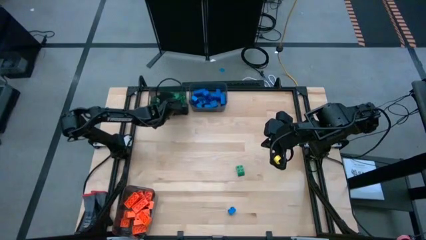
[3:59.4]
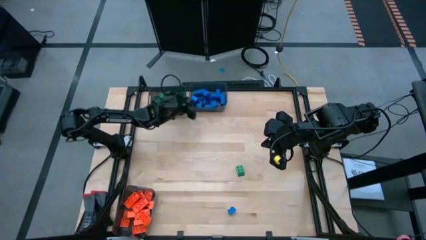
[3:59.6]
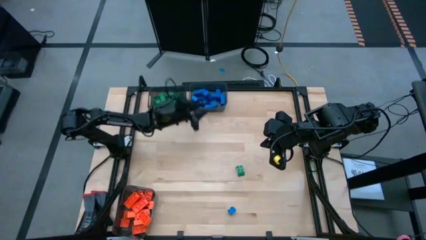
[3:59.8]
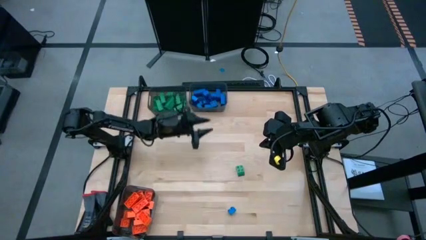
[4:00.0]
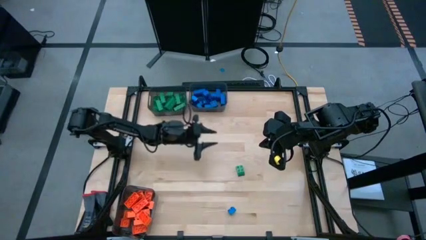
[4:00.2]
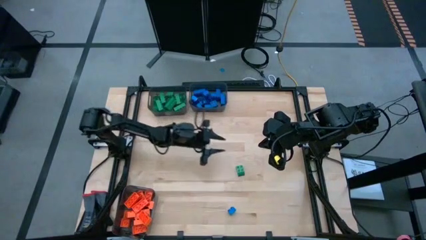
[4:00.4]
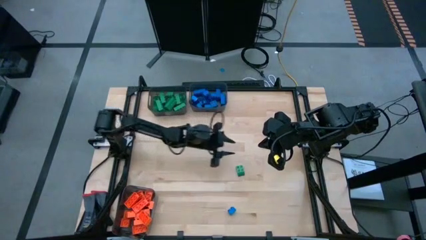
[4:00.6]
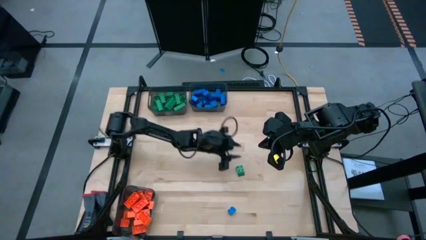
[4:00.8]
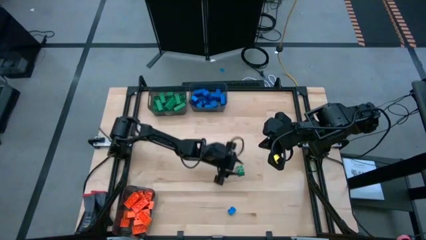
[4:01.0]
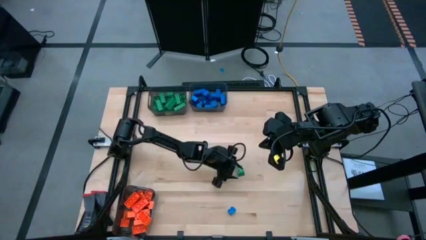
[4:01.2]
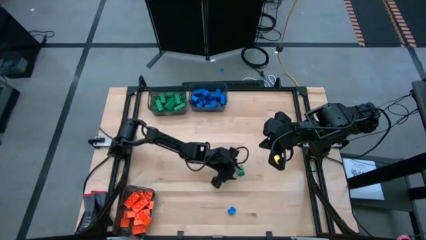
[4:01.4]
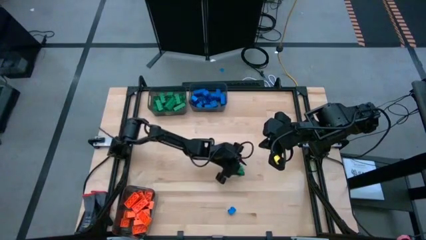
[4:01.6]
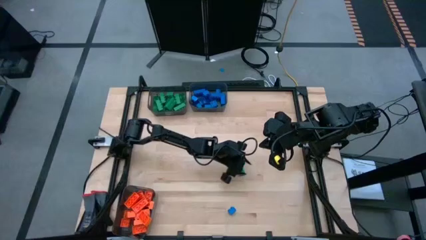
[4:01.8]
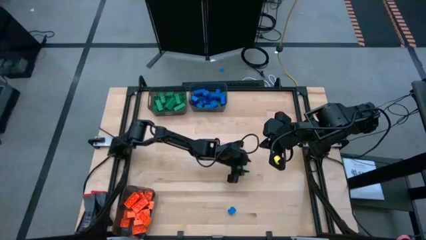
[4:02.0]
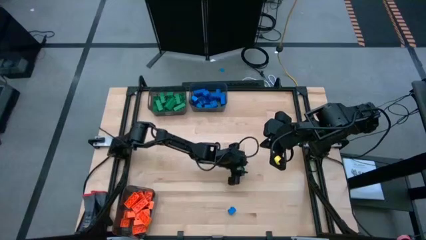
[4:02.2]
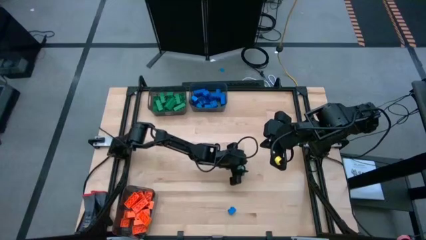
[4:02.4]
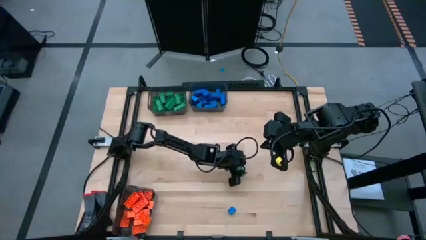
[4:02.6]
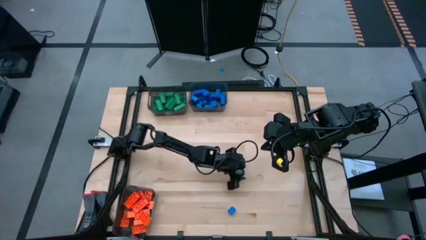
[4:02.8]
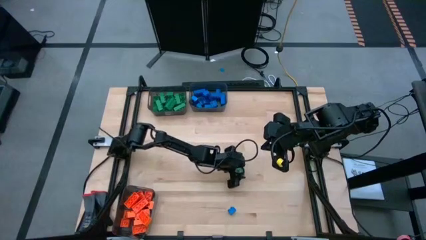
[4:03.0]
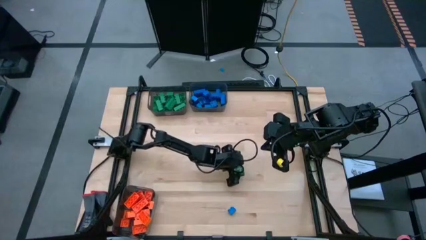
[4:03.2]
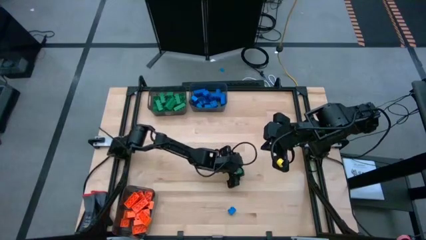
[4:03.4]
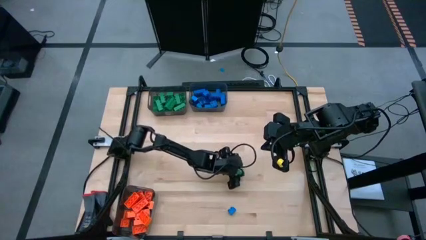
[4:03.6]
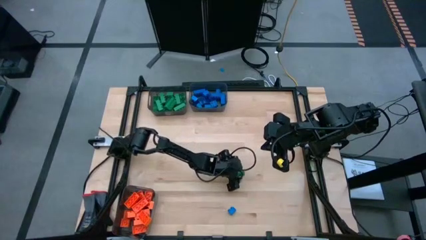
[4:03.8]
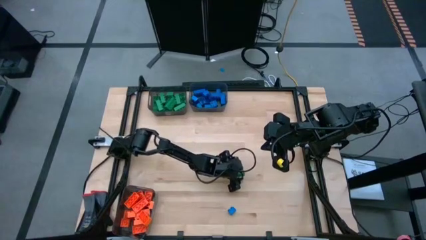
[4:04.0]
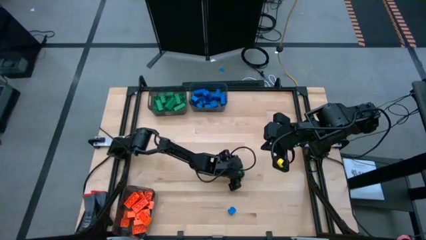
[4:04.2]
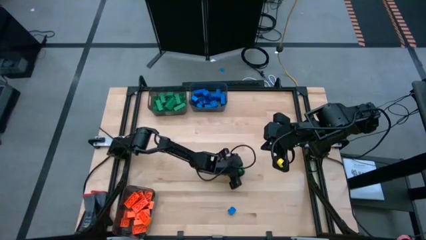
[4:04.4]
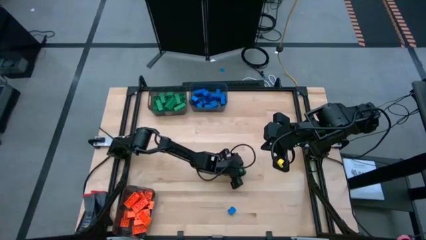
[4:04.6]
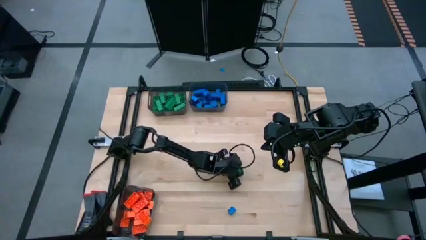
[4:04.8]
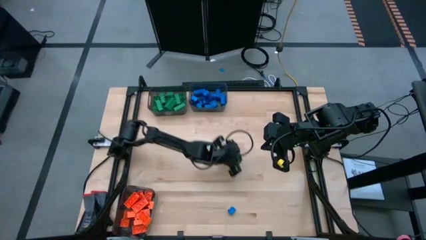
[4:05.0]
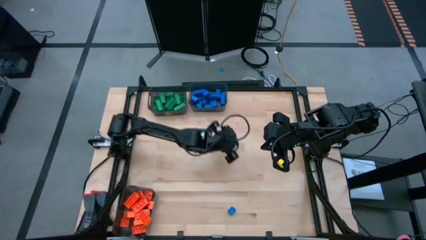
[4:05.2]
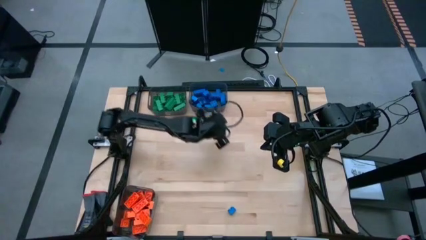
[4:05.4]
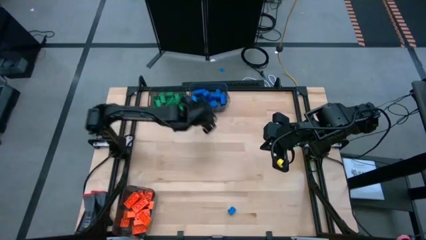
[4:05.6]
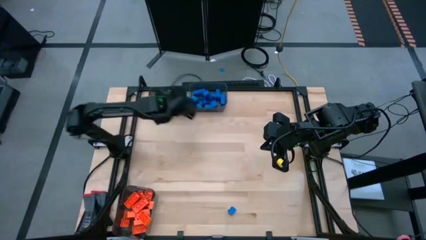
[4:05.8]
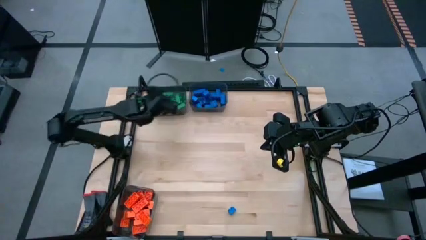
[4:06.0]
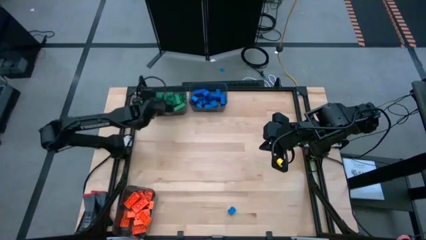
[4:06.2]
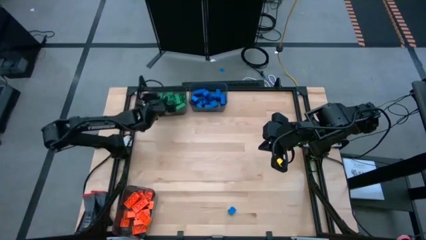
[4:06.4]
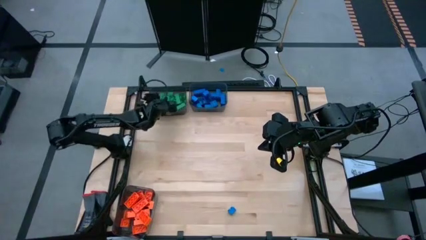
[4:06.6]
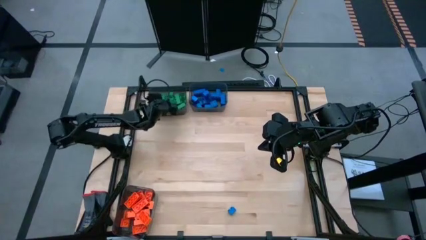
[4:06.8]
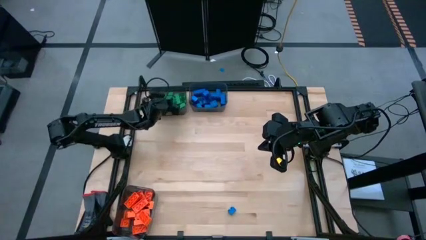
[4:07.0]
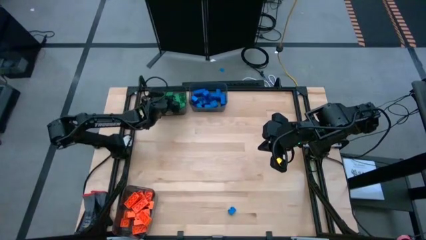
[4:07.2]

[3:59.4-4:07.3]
Task: Sort blocks
Put the green gamepiece into the top left black bin

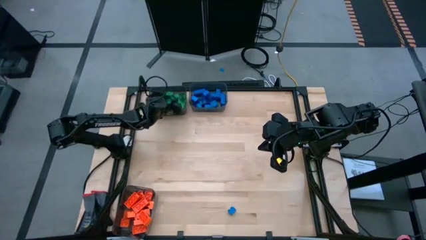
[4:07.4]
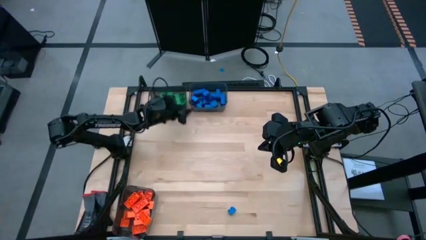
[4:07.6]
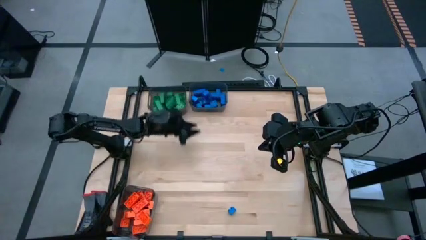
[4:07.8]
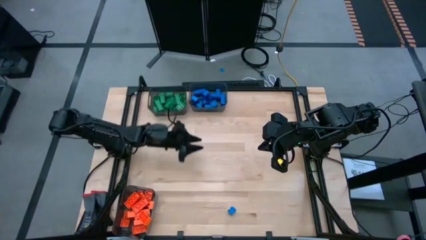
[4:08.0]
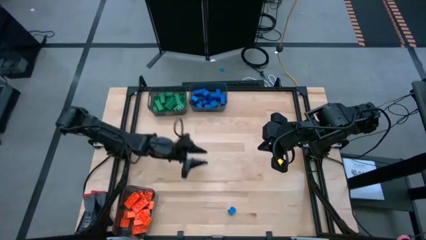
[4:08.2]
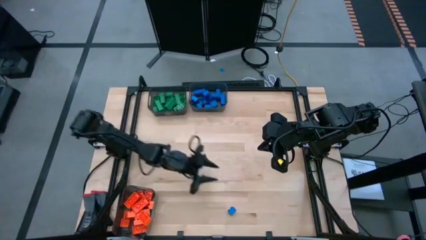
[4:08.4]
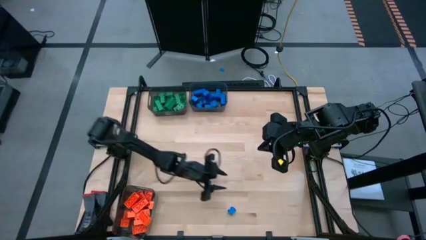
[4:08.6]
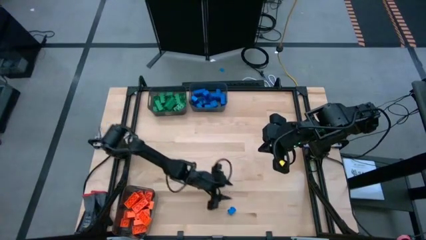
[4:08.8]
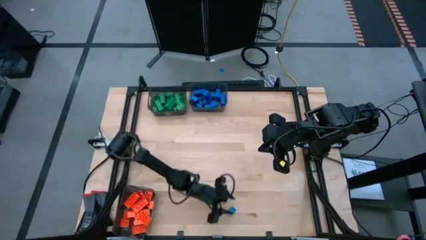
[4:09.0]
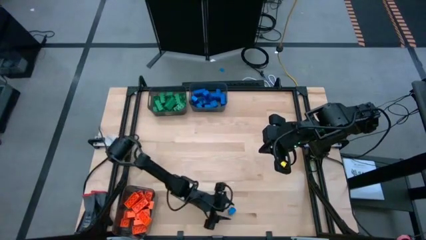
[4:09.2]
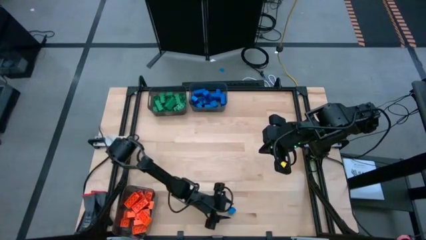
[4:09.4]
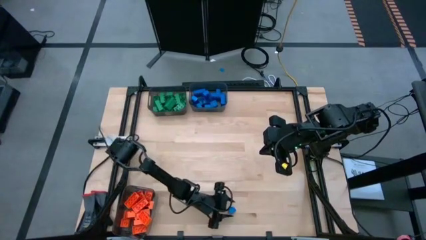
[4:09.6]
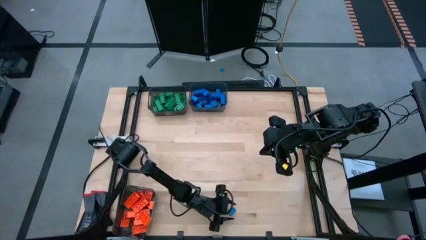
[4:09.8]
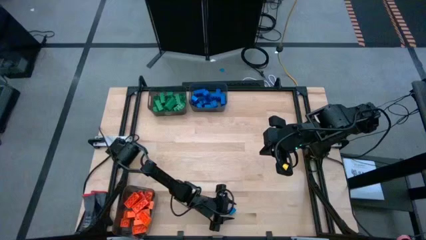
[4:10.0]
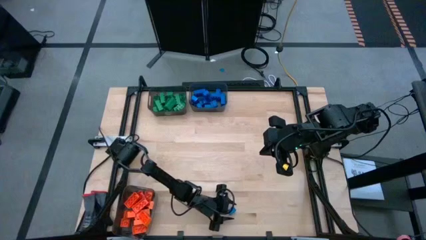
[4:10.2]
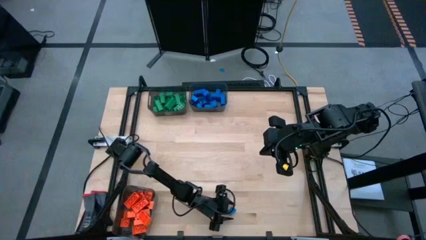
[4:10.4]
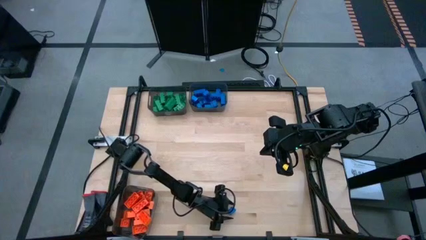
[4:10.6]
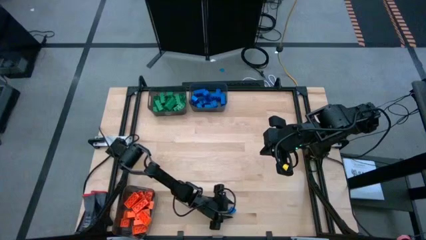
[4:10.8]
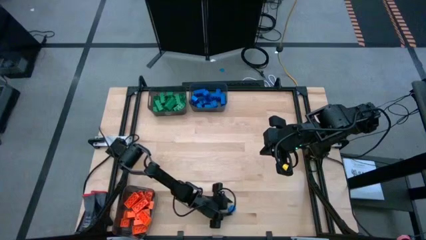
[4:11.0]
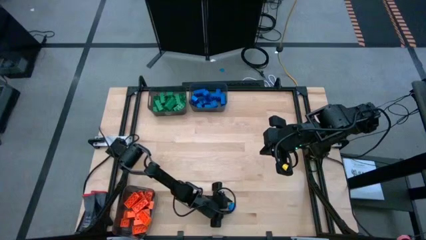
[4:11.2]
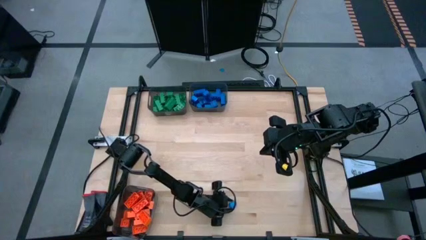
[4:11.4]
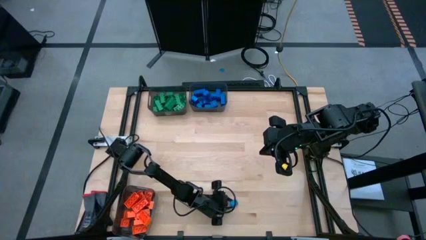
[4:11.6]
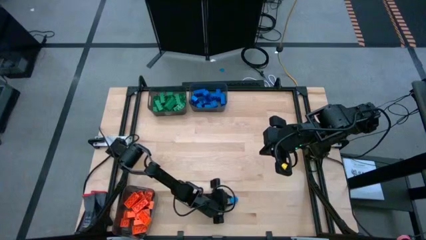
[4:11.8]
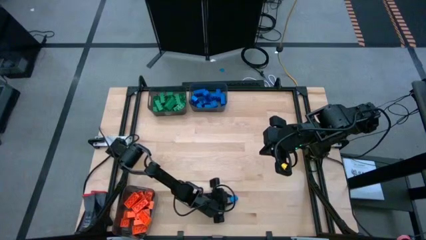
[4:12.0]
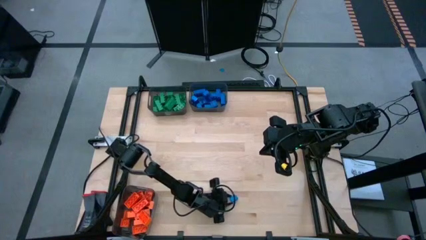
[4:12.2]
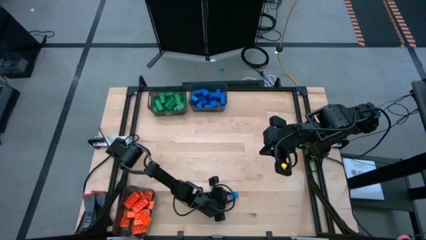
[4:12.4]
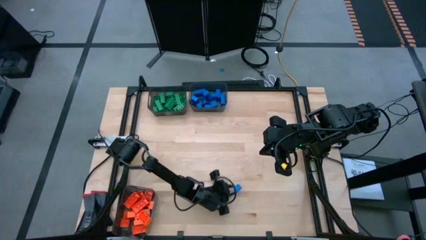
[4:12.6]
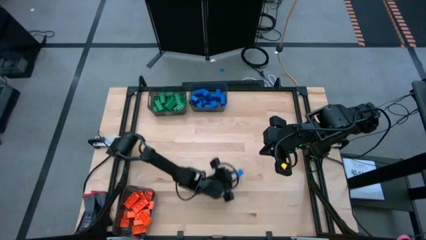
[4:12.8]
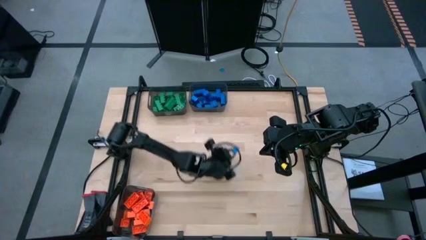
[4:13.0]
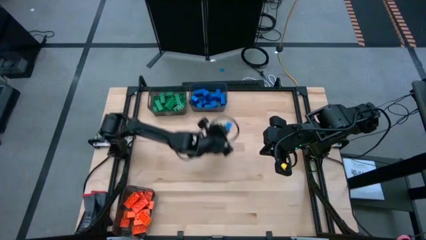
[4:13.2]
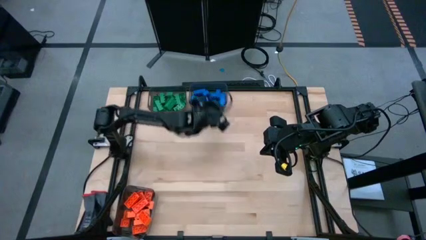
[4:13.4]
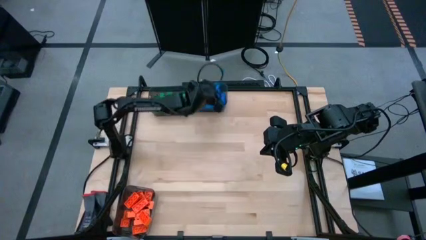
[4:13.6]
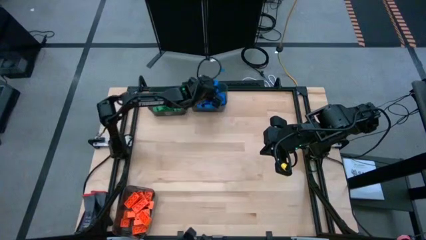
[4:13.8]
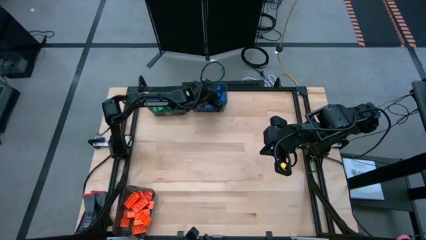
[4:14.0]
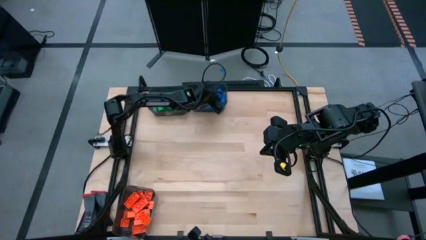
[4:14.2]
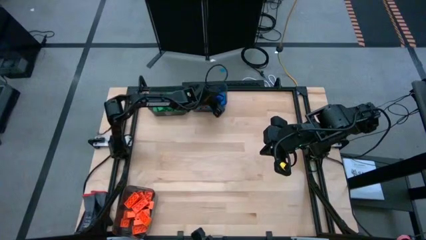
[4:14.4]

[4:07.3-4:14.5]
Put the blue gamepiece into the top right black bin

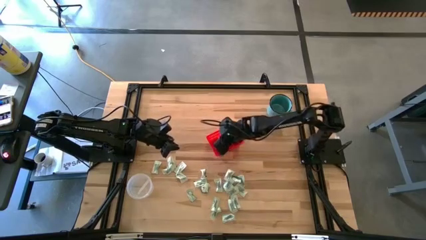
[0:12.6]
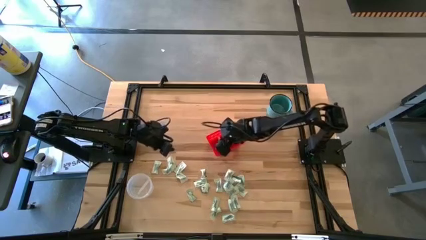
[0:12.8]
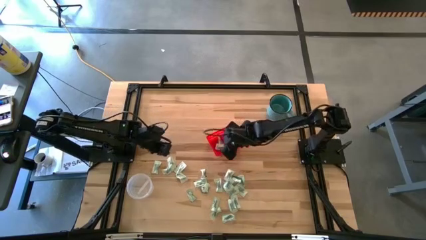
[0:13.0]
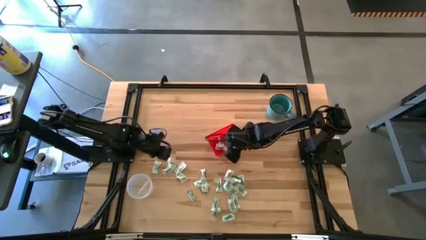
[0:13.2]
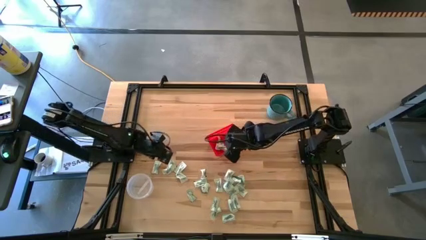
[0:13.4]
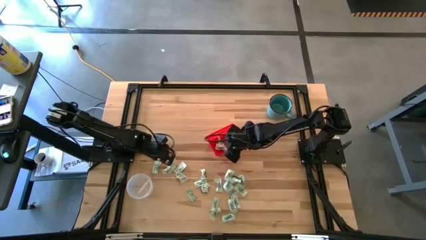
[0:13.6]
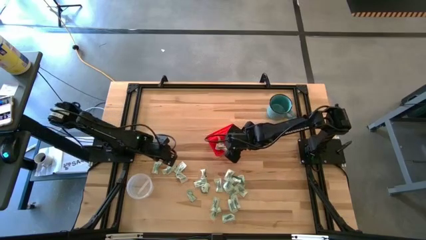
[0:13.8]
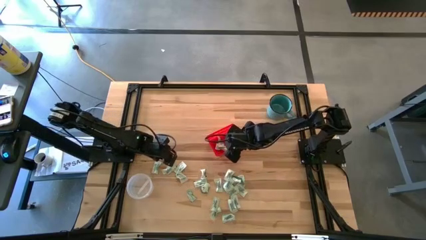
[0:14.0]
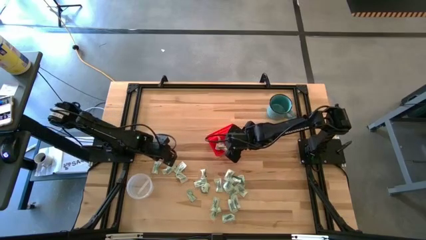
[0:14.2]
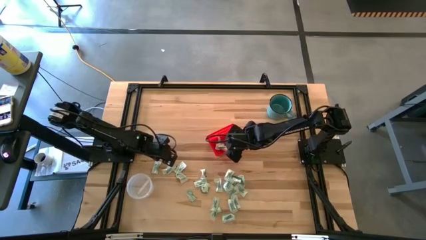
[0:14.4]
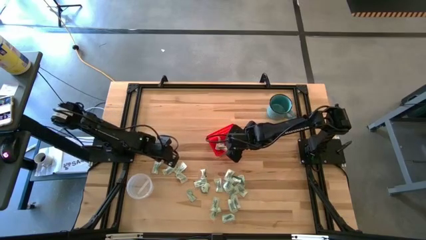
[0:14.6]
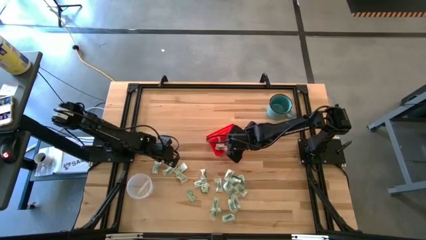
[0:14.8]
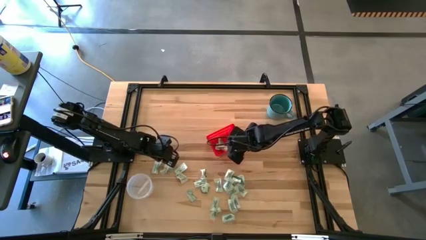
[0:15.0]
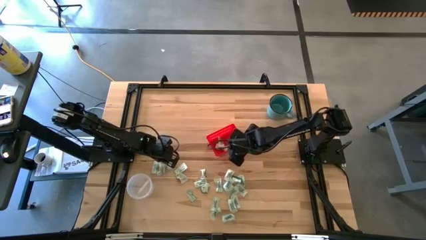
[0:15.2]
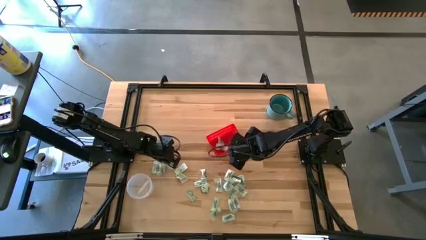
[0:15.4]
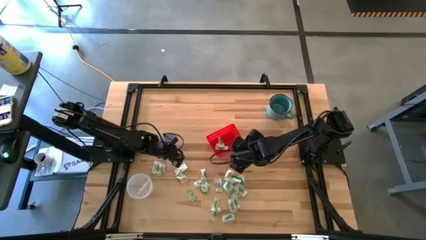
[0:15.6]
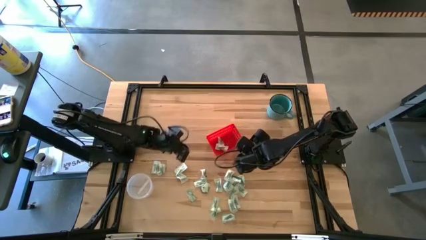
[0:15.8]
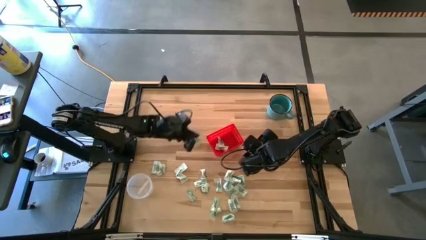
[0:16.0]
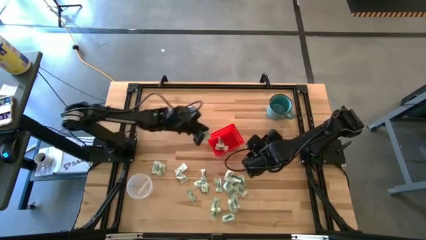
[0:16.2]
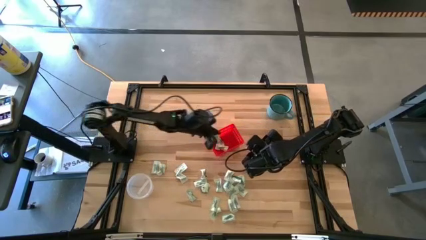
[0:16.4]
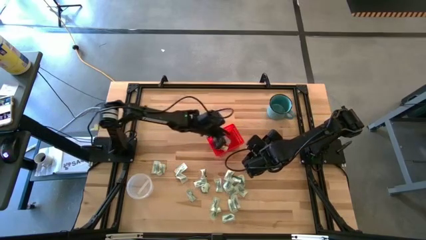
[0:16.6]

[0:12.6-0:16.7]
Task: Pick and place items into bin
Put the stevia packet into the red bin
